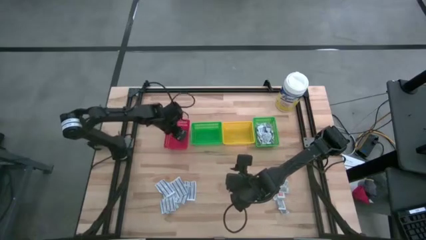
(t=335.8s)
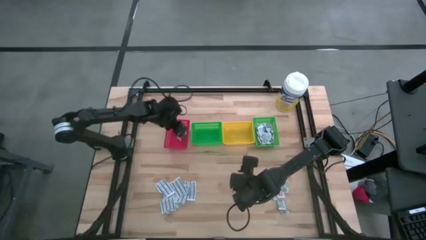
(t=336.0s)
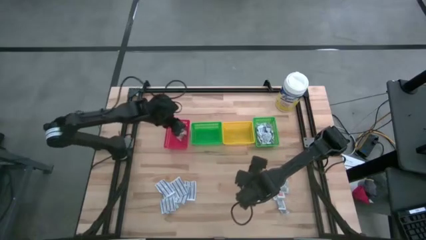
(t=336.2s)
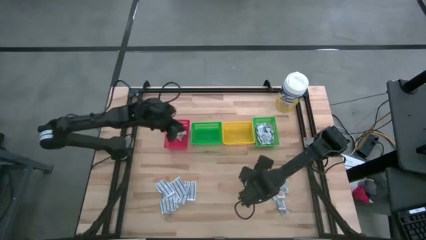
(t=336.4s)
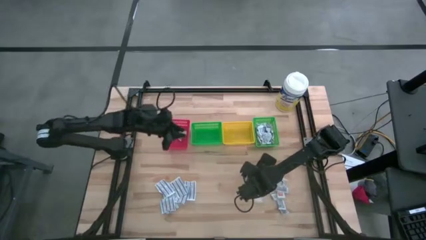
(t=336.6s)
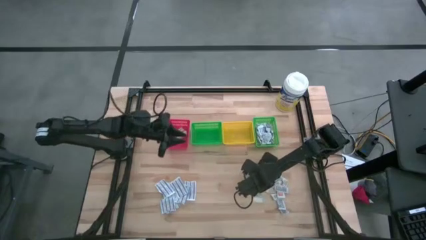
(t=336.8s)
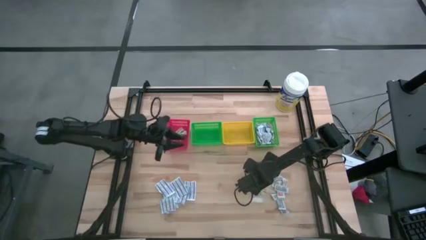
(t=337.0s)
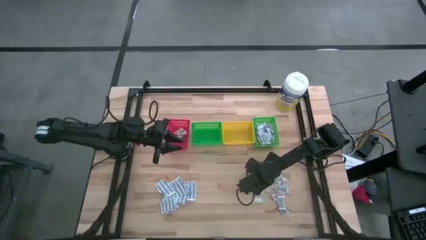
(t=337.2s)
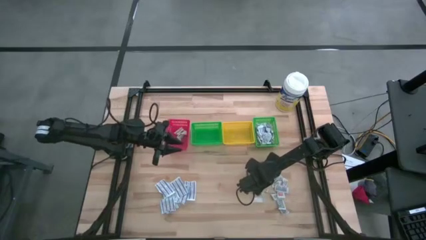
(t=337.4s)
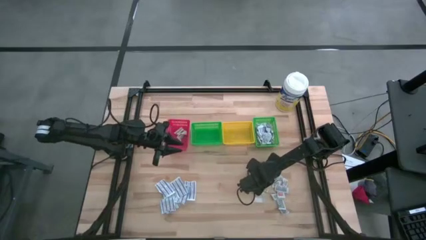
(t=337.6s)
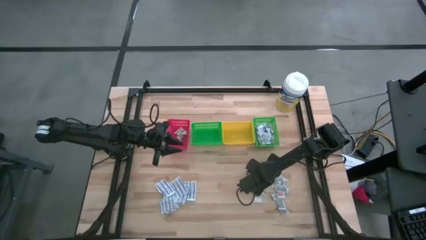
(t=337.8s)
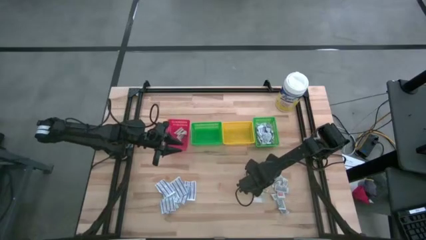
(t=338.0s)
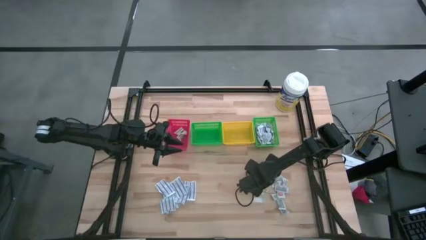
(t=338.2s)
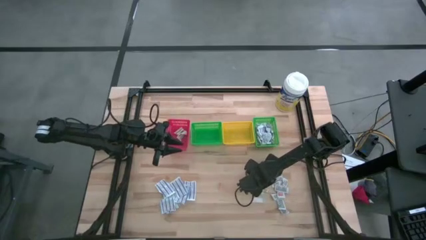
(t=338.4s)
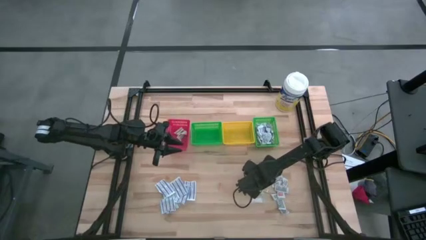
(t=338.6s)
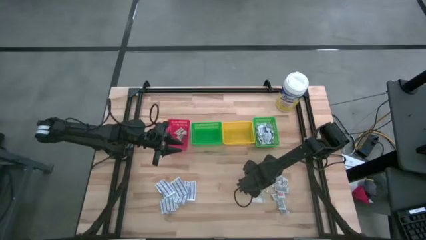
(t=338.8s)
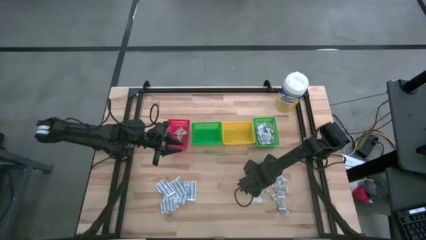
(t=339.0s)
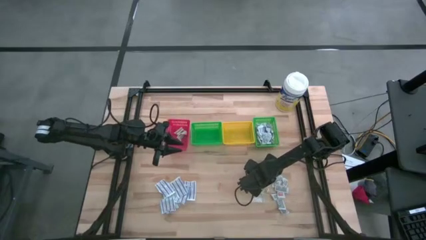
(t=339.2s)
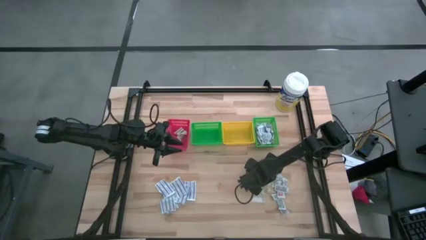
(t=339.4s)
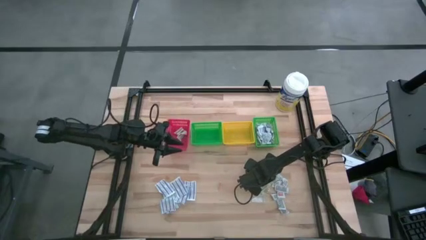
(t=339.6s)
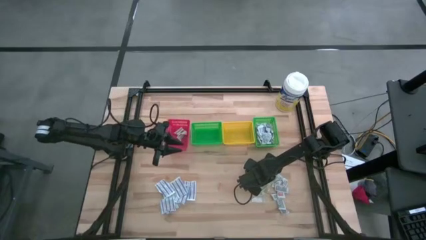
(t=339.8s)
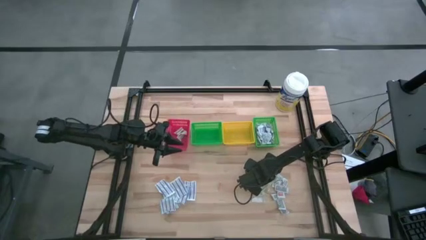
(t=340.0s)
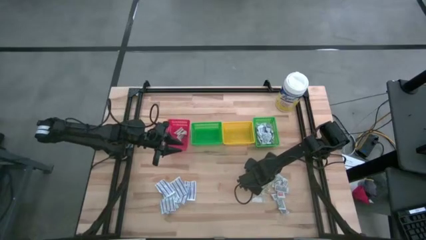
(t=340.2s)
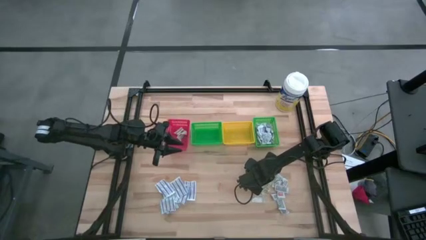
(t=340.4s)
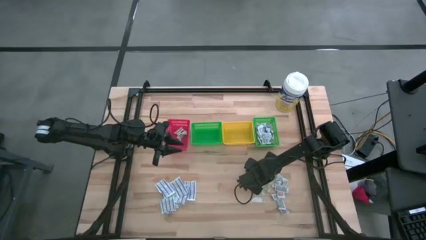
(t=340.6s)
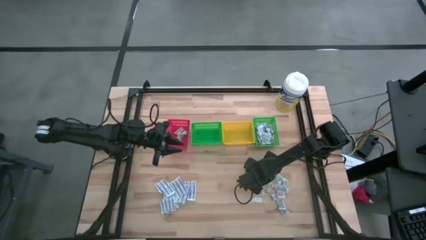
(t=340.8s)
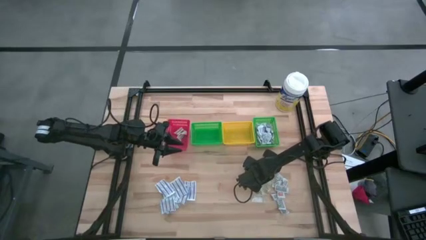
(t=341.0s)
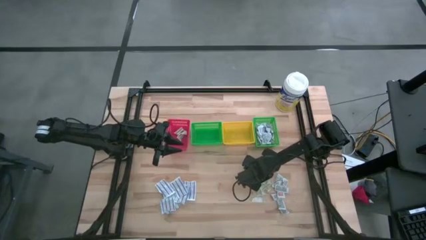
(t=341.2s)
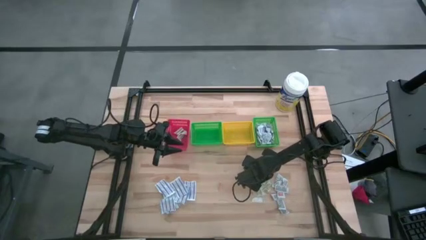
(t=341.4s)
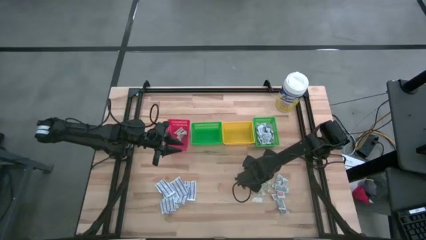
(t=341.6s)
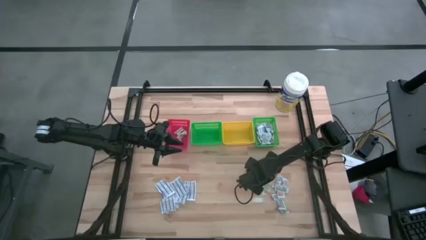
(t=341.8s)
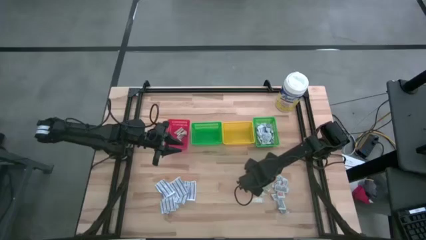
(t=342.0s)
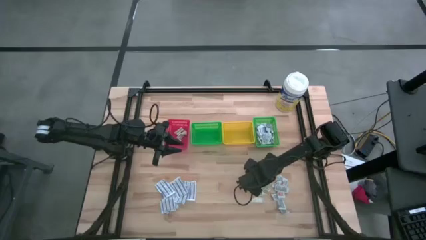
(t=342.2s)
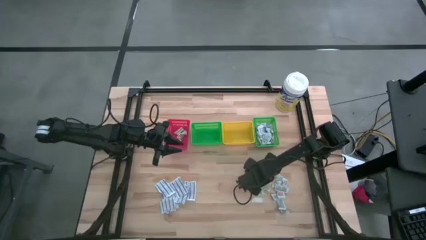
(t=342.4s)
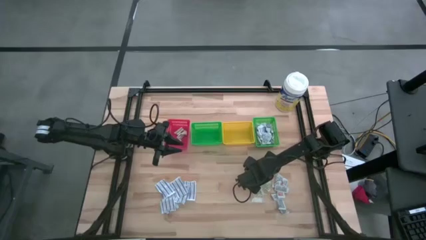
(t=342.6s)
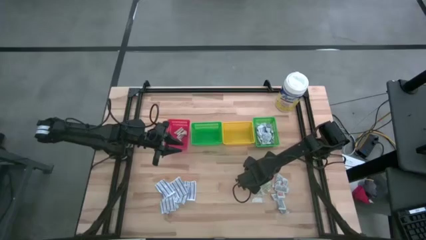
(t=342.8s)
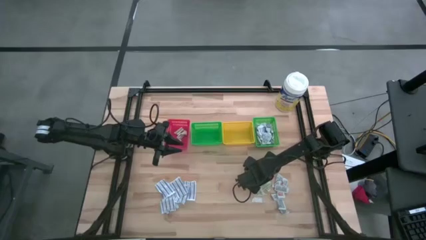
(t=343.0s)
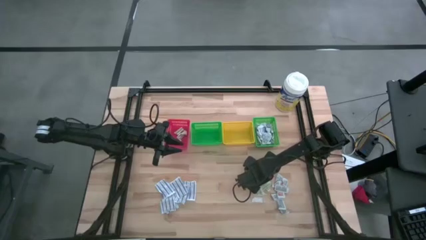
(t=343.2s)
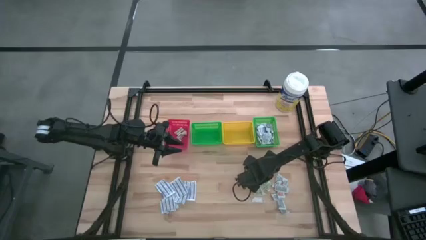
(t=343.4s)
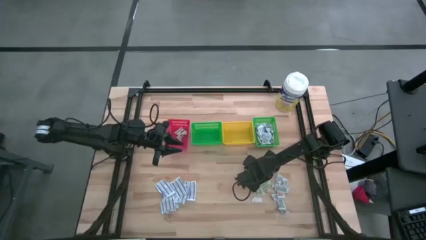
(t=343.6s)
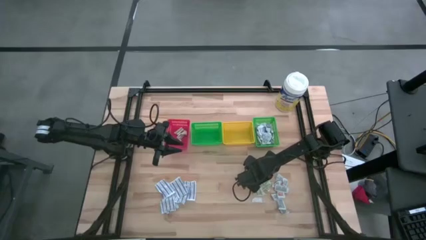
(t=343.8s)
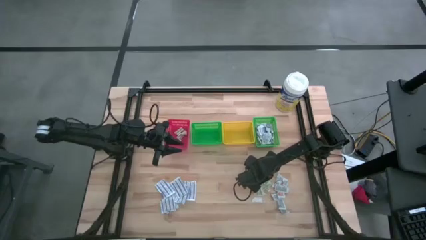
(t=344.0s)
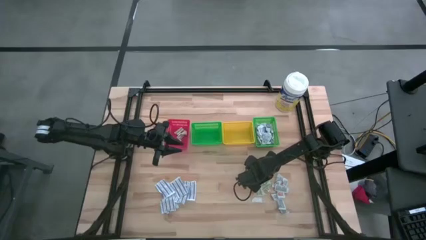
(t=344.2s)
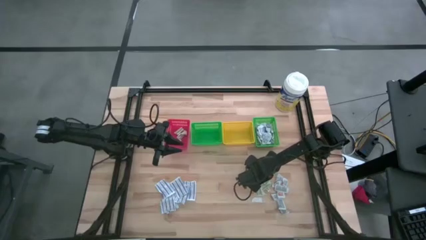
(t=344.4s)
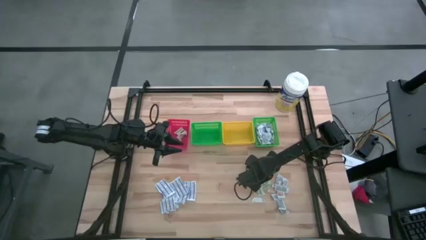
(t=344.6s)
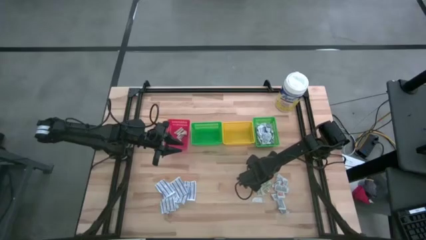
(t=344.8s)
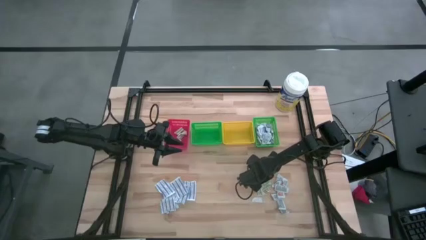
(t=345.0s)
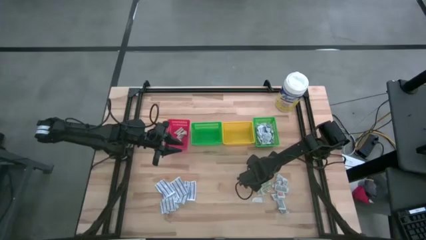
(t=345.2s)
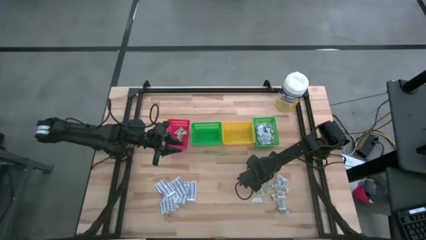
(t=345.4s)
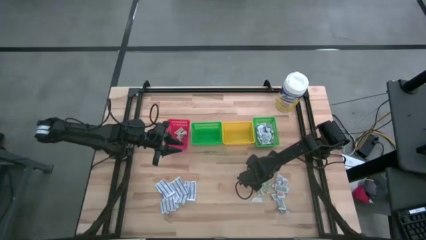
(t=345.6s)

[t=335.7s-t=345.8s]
Task: Pick & Place First Aid Supplies
Put the green bandage into the red bin
